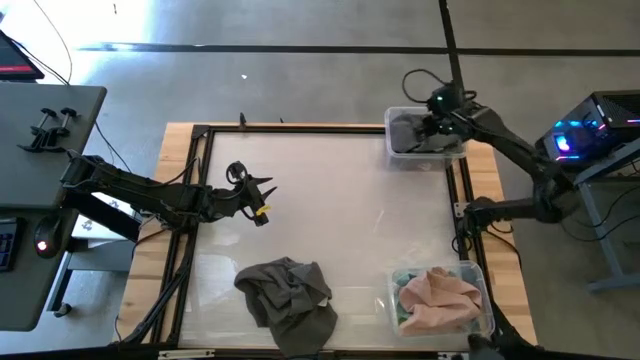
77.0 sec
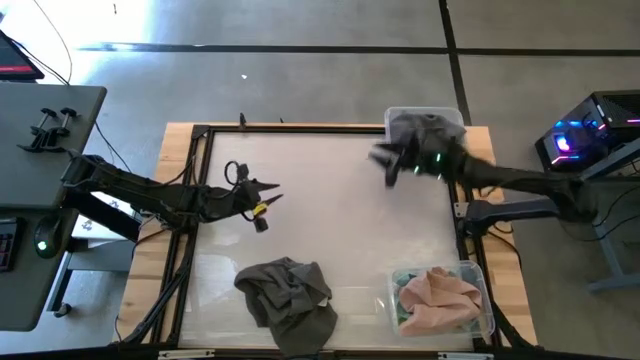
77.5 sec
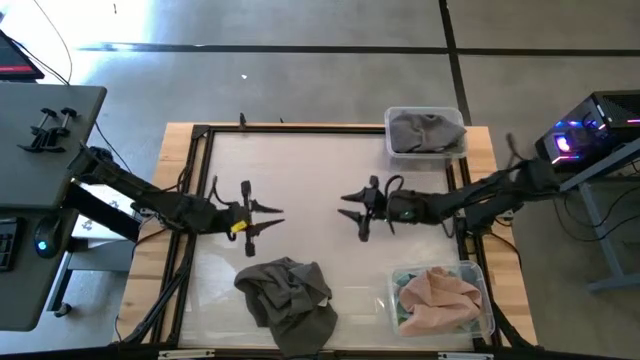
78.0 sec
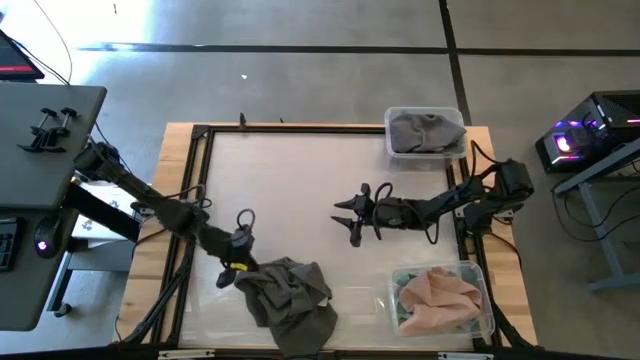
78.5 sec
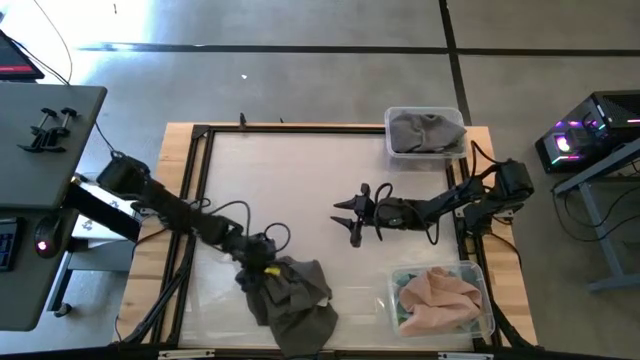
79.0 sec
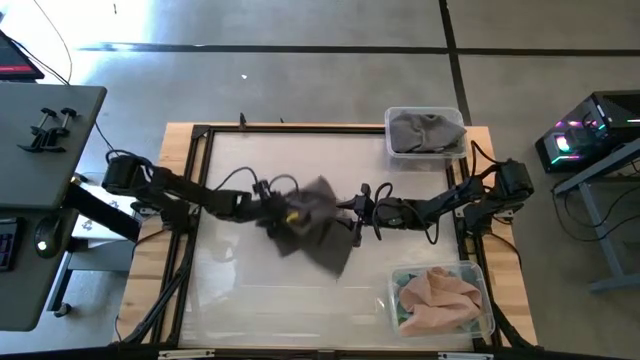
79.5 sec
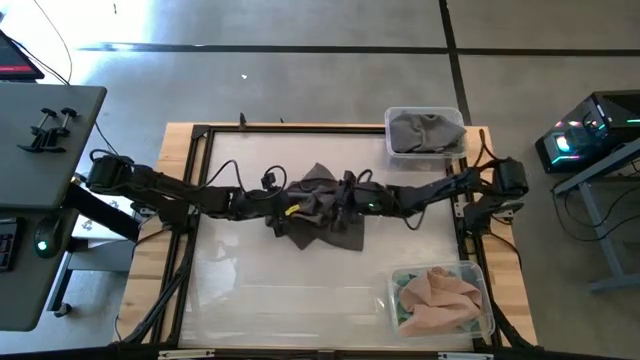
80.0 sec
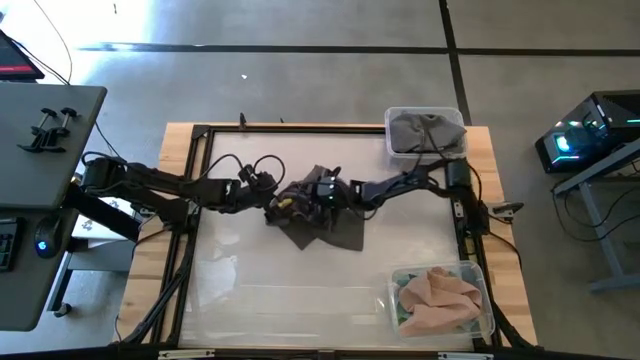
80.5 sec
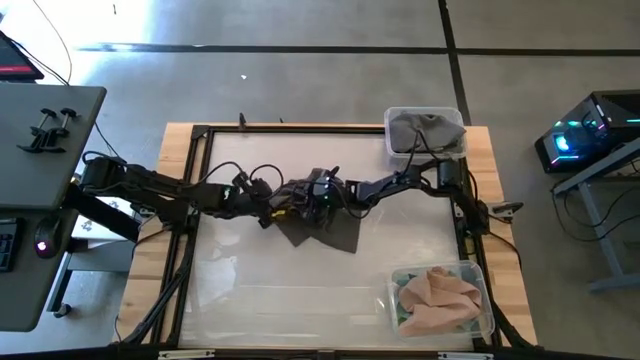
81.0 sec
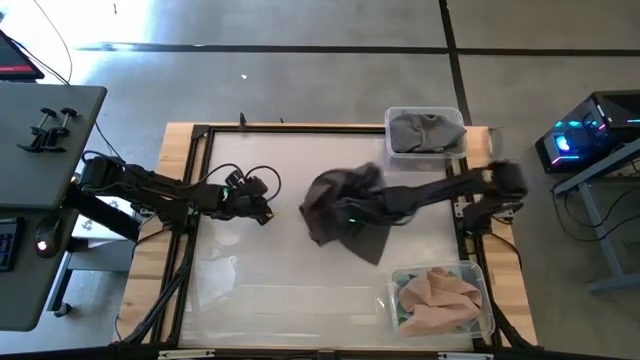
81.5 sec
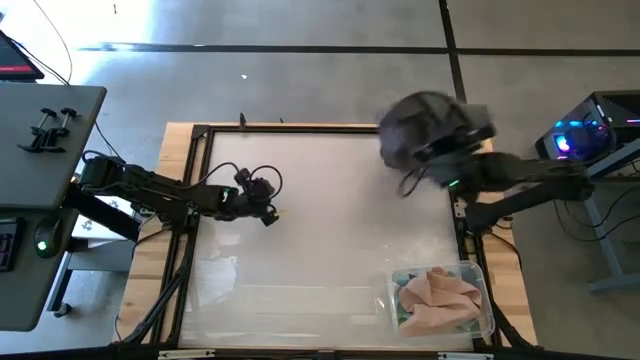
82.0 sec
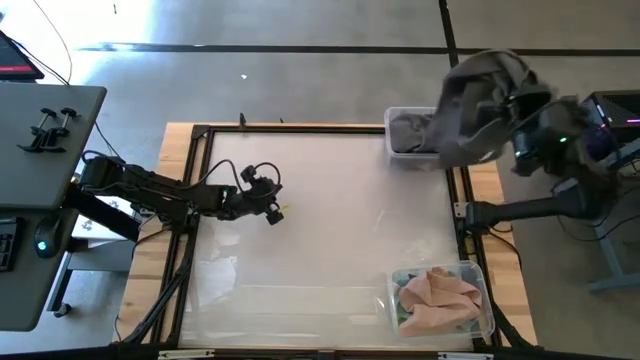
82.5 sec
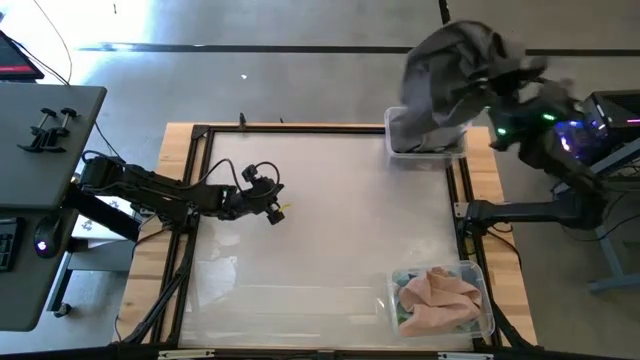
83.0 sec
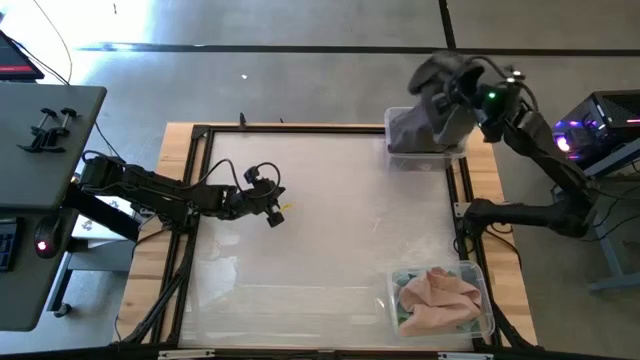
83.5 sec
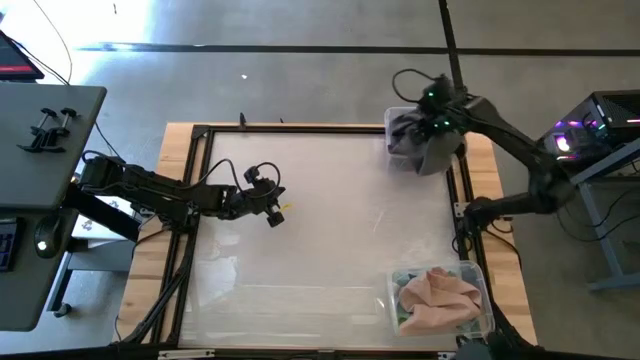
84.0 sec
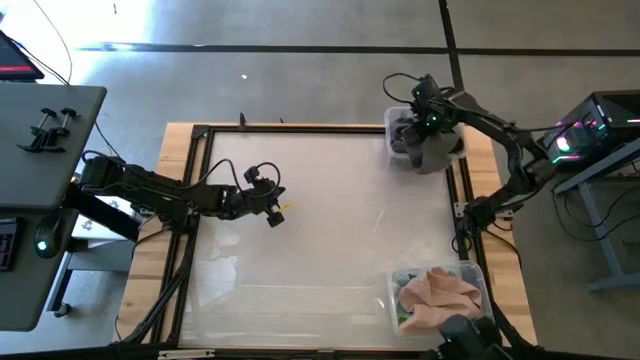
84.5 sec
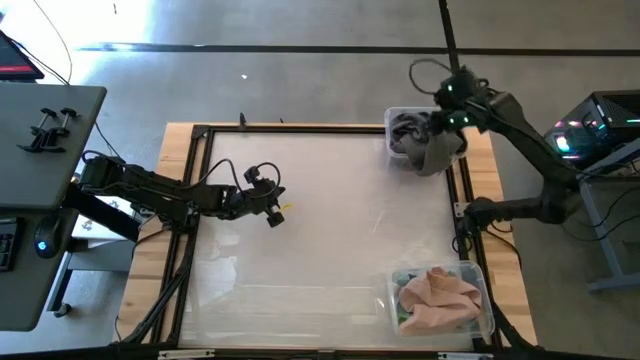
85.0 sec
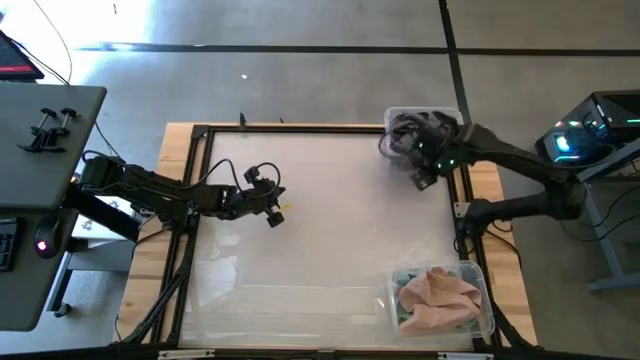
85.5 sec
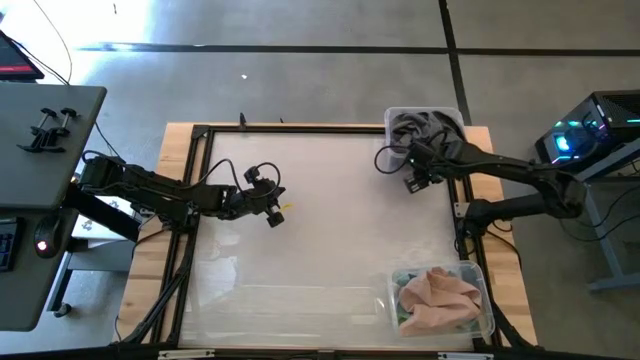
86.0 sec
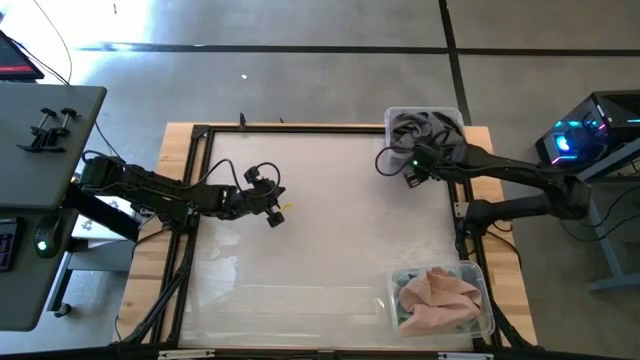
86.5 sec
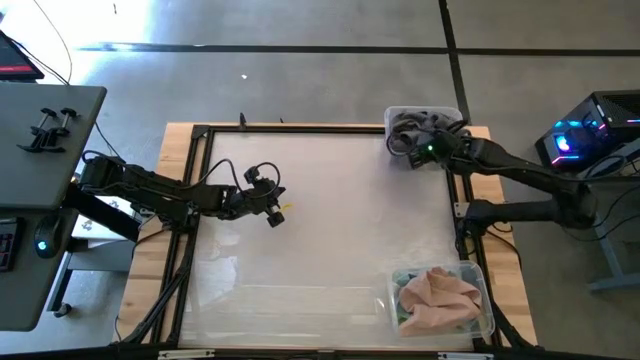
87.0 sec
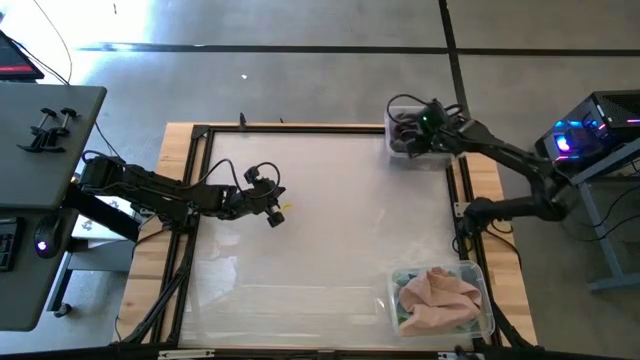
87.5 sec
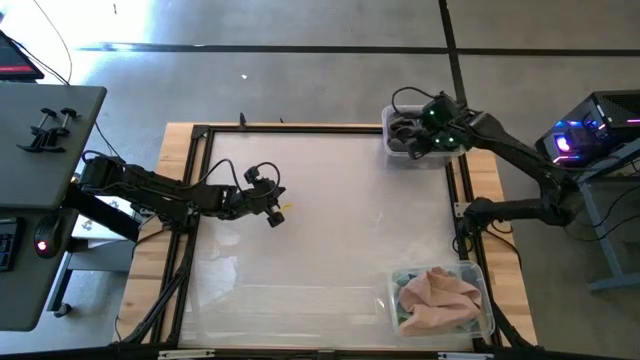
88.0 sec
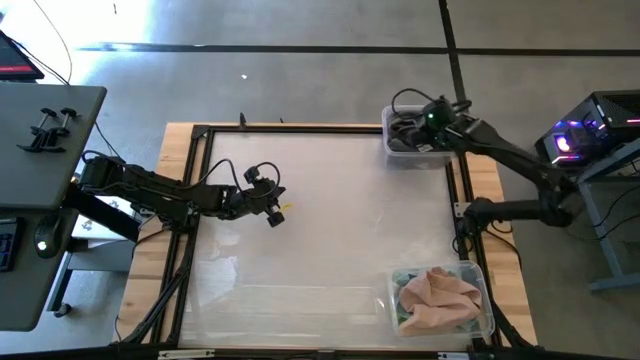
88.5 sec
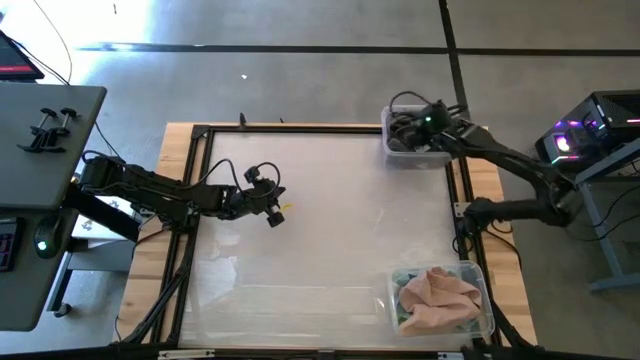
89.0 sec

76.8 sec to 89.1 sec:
Task: Sort towels by color in basket
Put the black towel into the top transparent bin

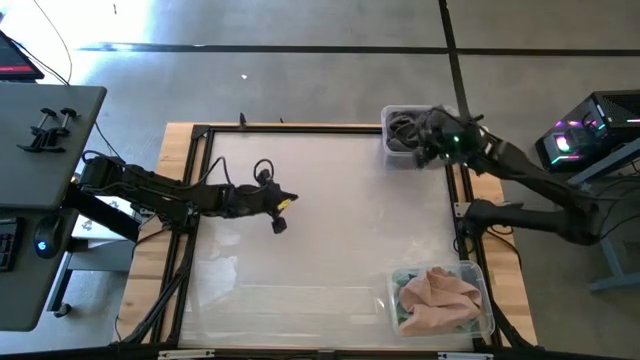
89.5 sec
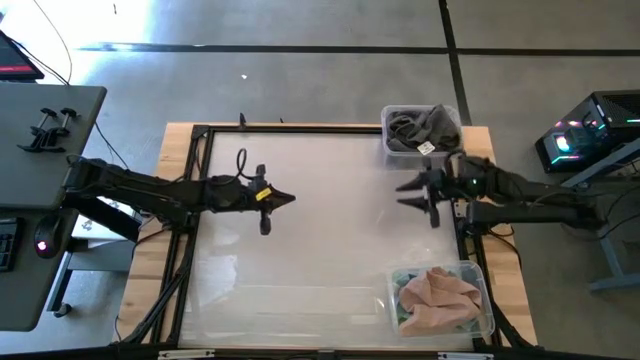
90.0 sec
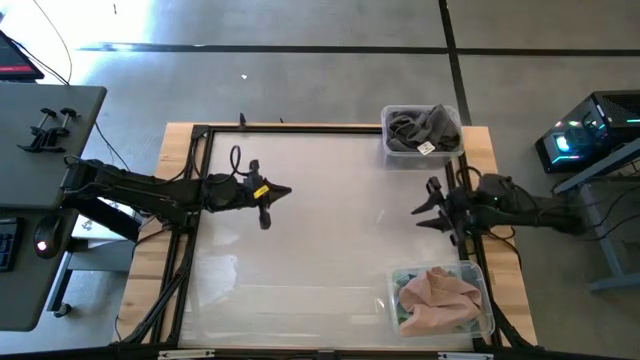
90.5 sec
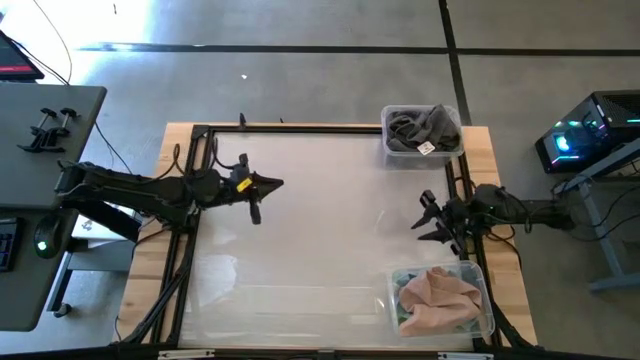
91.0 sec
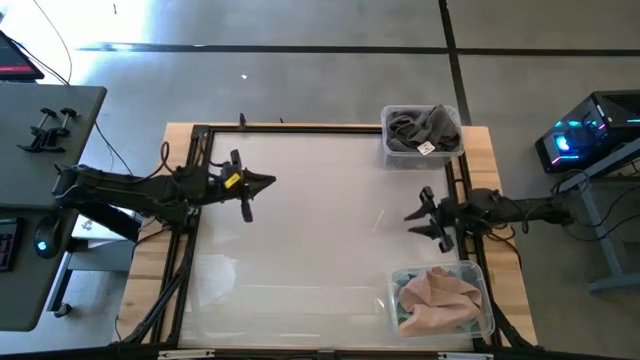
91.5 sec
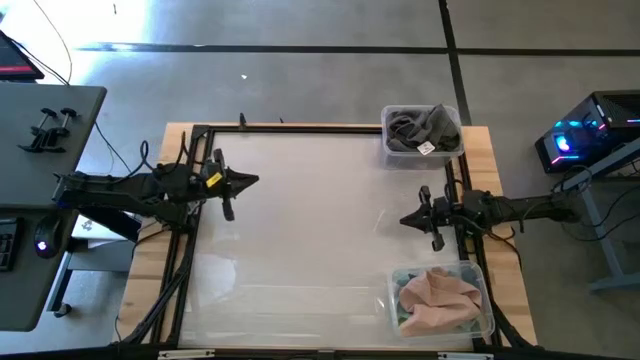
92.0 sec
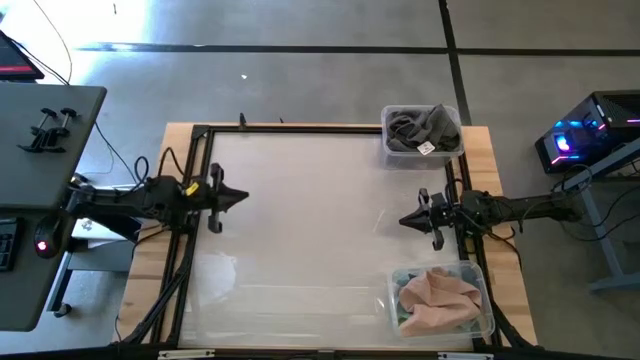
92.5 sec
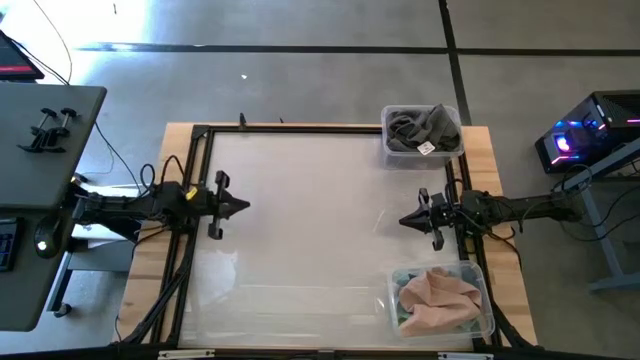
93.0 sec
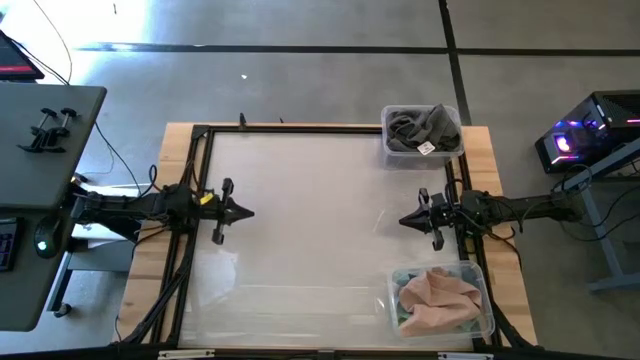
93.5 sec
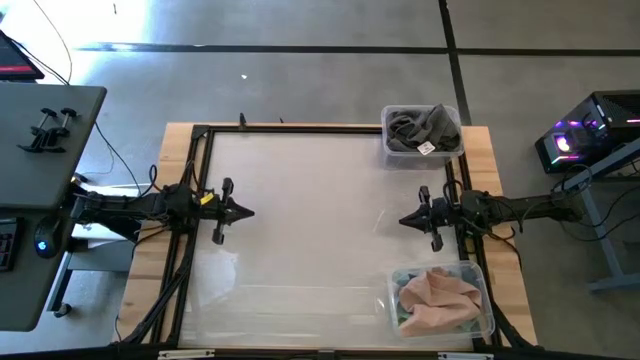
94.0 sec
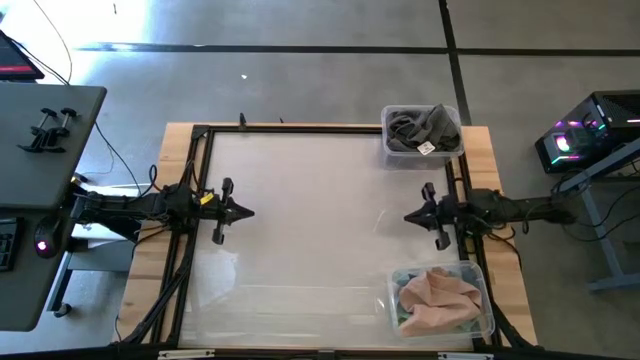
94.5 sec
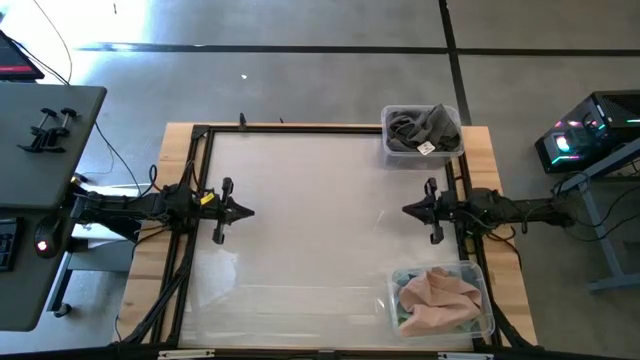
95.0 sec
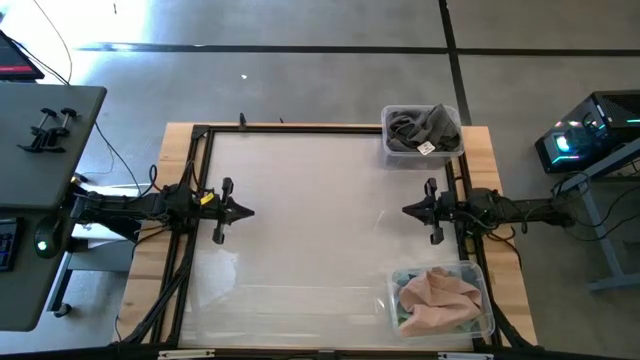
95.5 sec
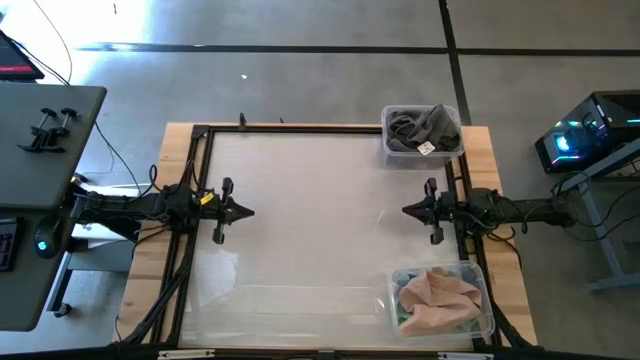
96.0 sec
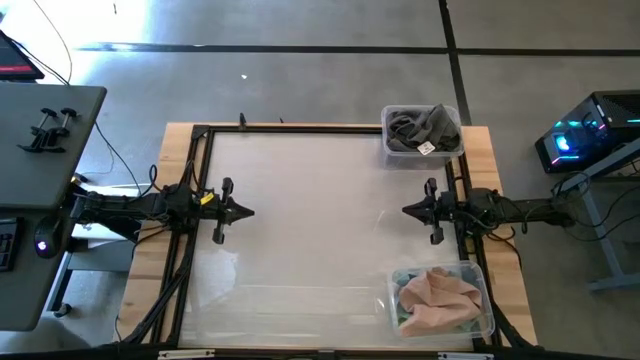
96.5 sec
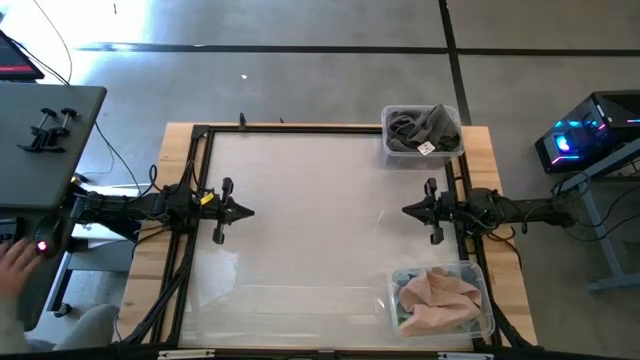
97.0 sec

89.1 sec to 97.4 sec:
Return to Home Position
